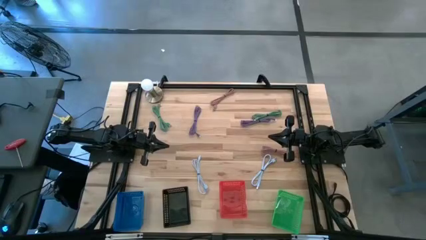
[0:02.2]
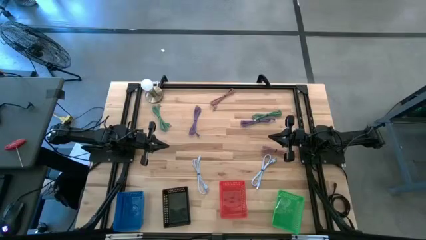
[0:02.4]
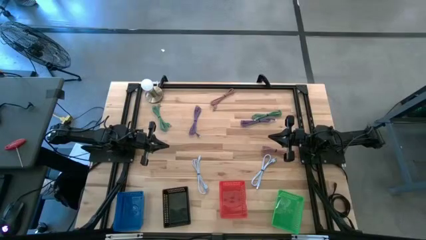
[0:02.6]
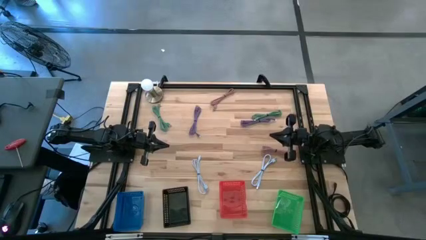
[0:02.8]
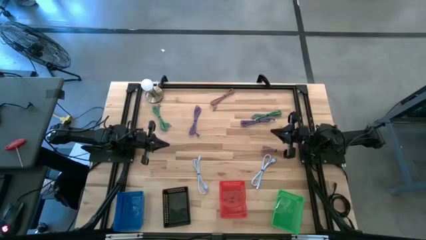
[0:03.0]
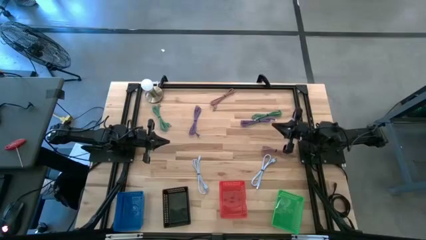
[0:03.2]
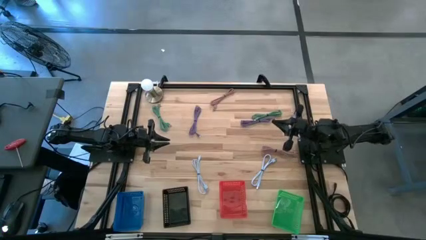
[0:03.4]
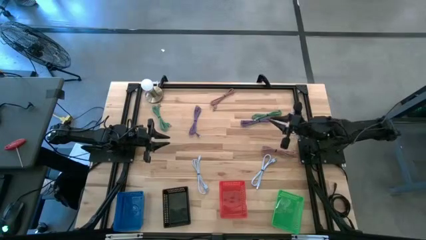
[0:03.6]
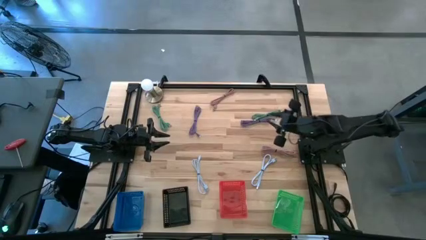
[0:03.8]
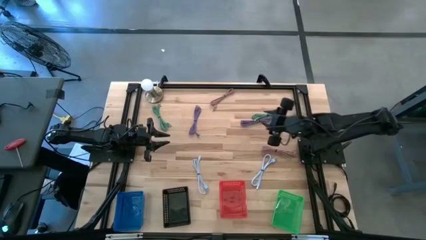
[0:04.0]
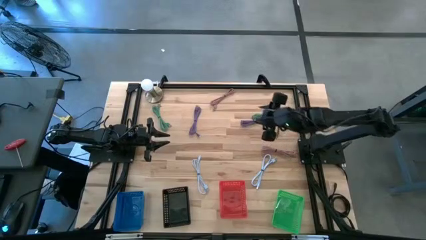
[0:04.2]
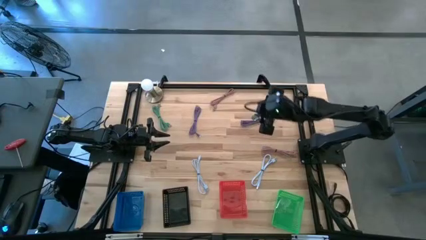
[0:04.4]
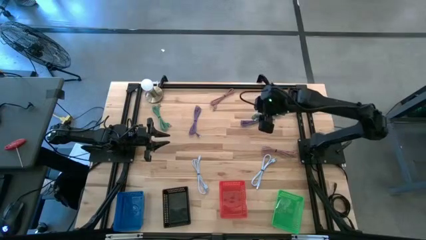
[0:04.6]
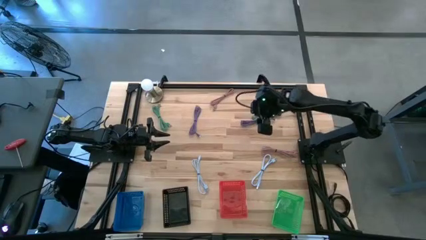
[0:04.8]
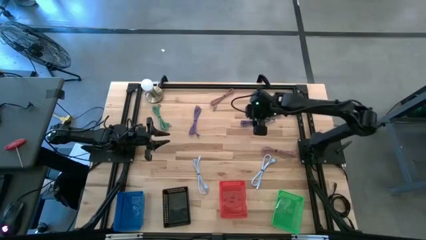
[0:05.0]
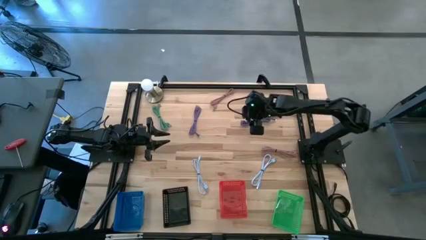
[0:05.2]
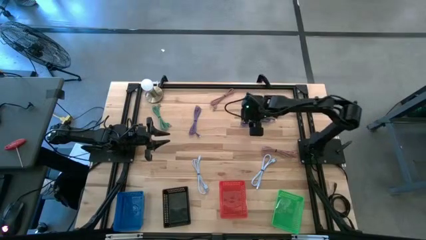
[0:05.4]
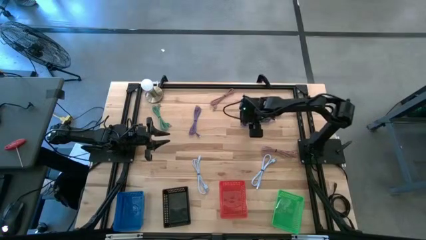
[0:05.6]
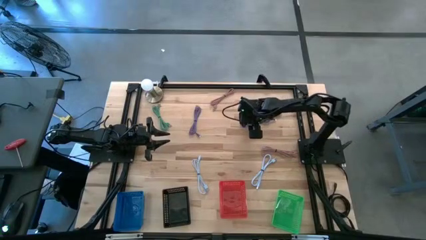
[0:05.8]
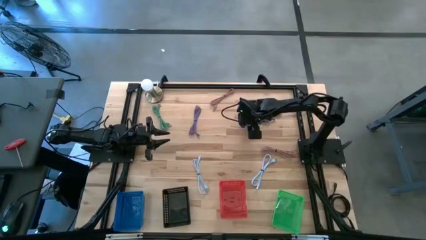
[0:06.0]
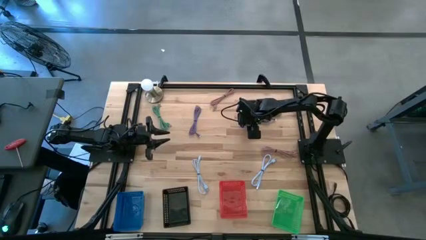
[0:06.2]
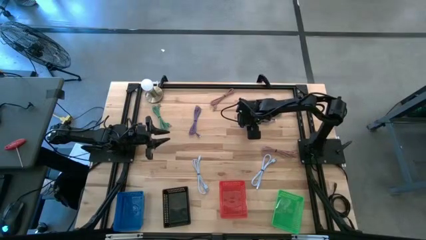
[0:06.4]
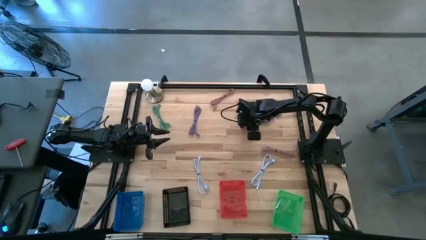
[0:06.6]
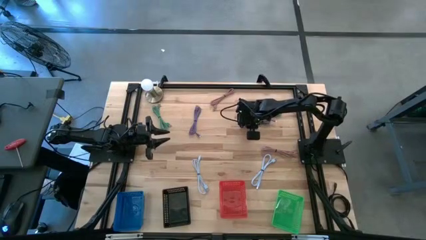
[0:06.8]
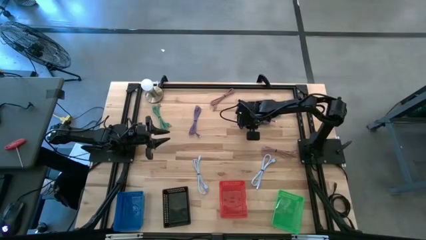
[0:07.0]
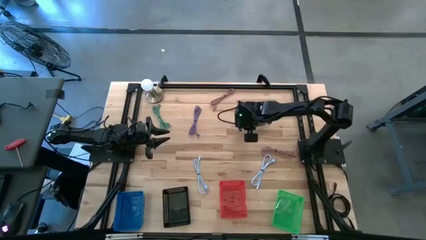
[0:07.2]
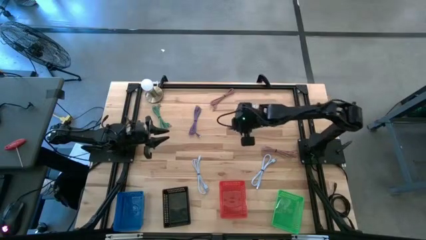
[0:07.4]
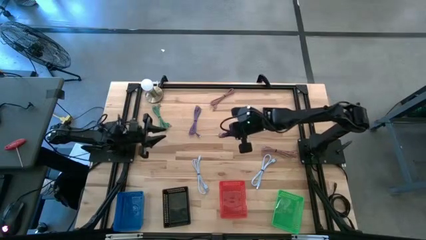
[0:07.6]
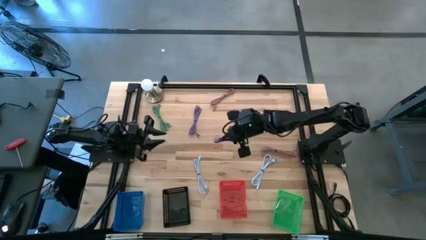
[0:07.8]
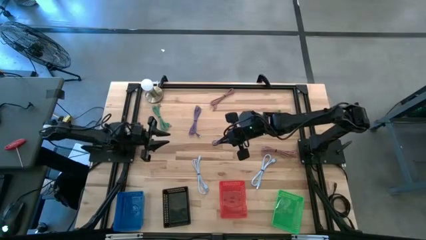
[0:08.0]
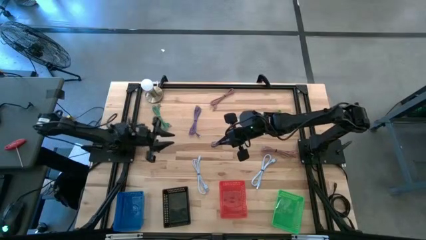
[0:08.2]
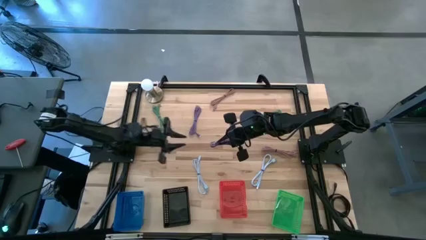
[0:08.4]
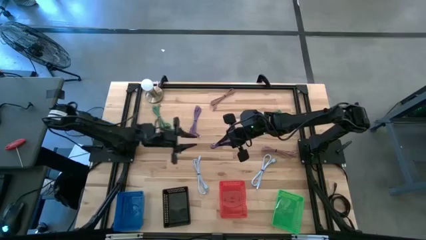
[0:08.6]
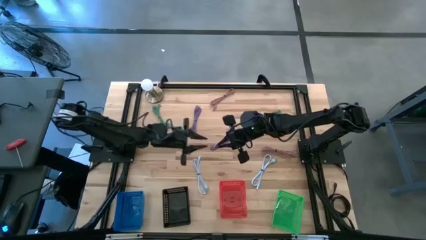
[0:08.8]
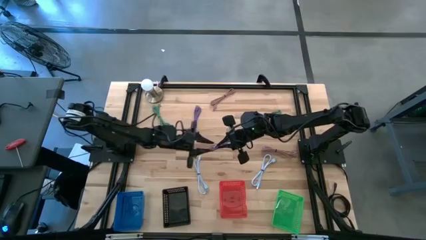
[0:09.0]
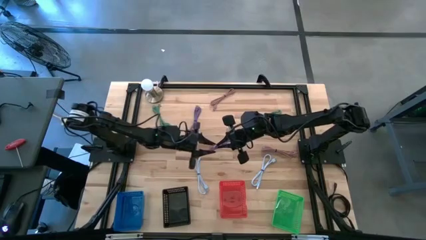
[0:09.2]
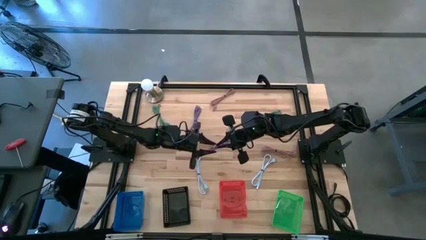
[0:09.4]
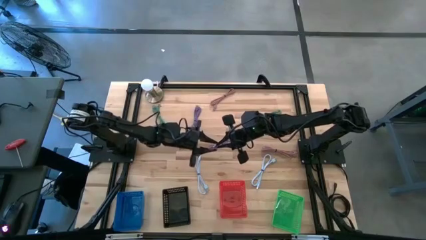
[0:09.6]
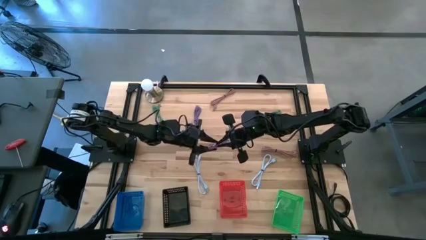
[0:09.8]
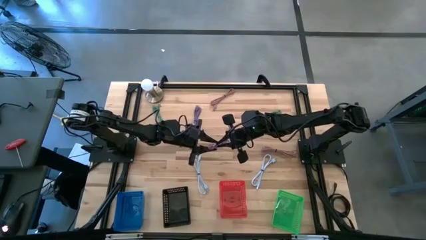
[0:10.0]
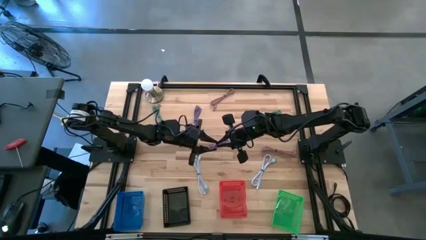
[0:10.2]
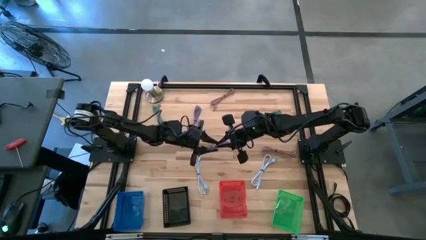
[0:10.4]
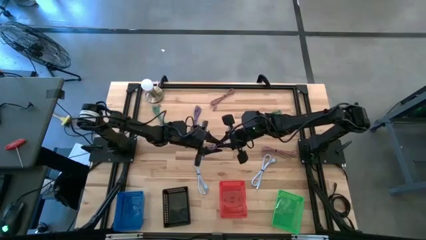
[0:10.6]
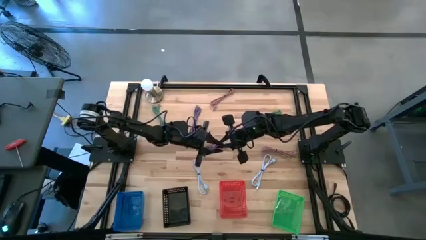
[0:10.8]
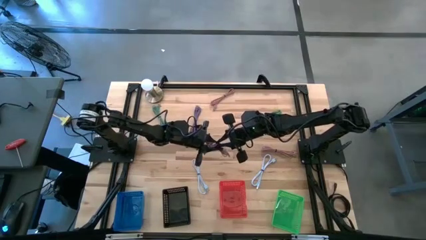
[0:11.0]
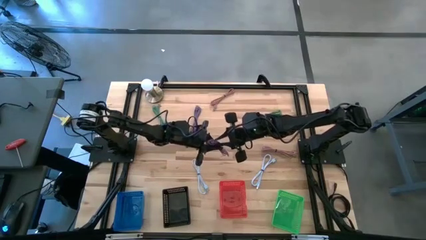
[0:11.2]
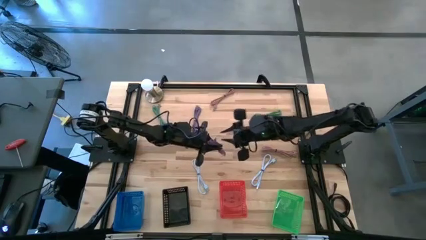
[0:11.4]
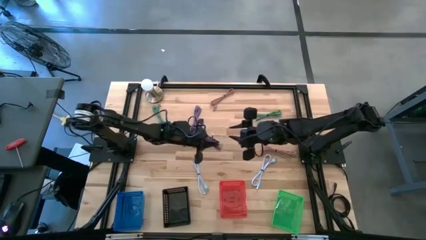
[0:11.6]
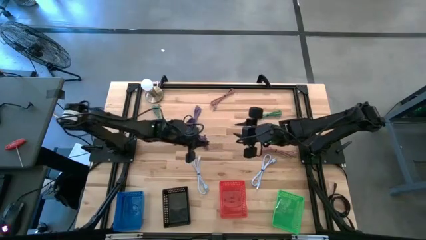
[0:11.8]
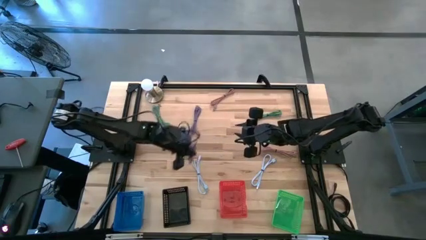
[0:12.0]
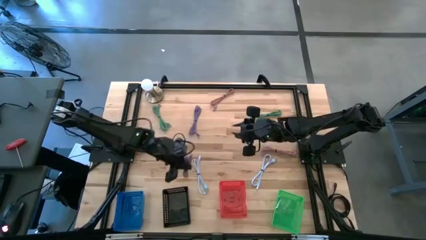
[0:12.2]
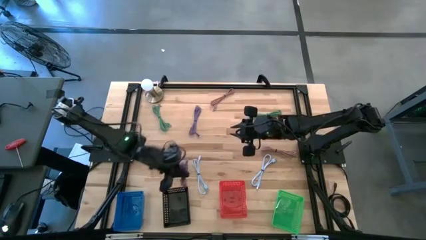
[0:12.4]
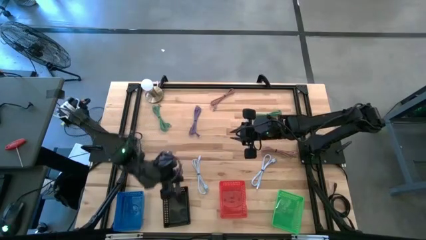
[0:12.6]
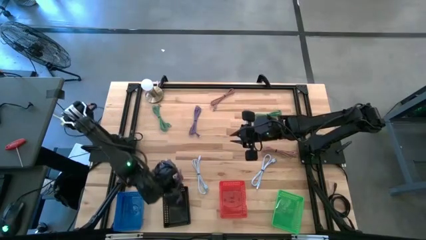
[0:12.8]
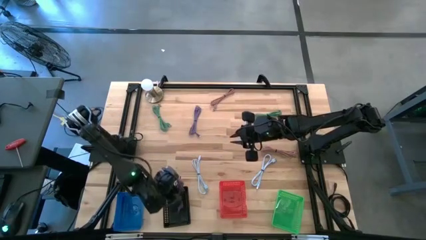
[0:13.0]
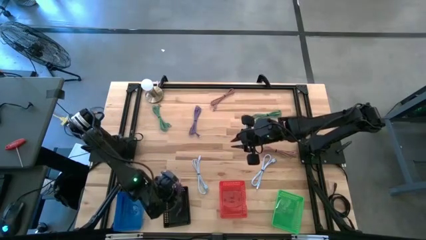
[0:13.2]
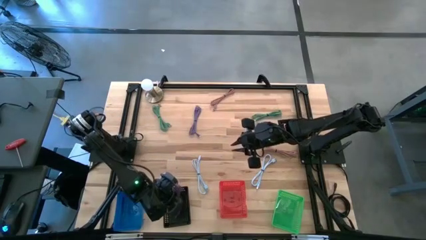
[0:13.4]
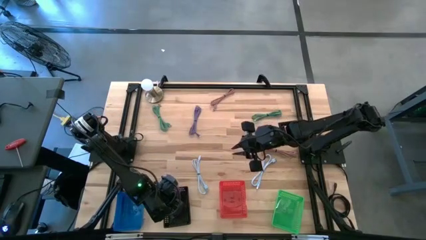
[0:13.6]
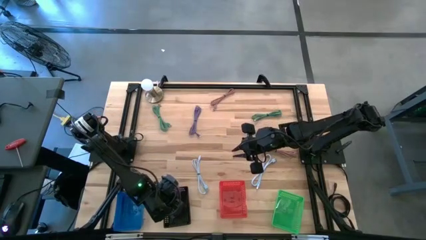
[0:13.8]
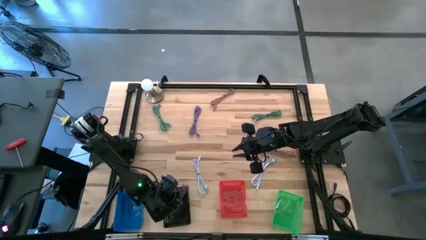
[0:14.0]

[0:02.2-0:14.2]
Task: Pick & Place USB Port
Put the right purple charger cable into the black bin

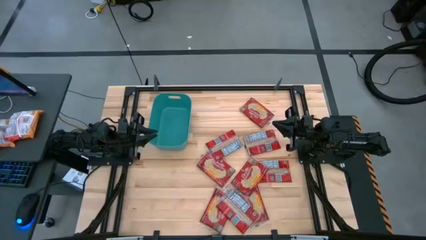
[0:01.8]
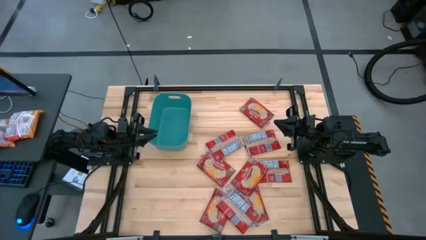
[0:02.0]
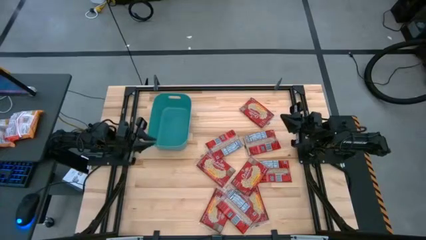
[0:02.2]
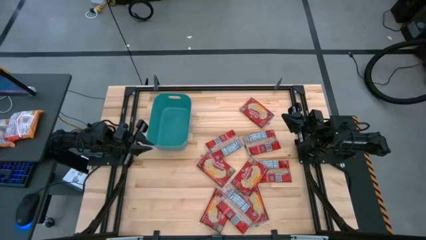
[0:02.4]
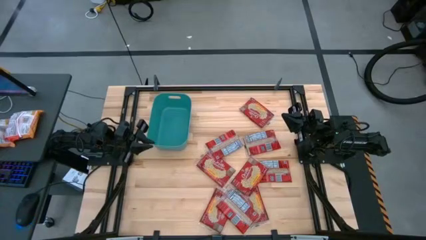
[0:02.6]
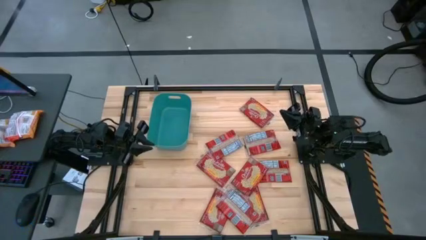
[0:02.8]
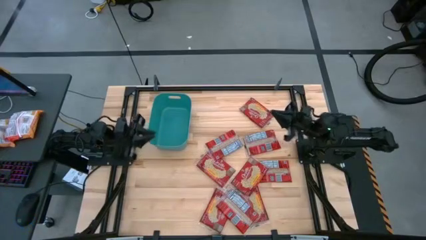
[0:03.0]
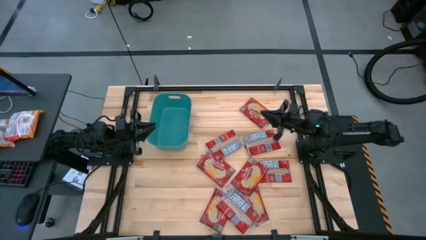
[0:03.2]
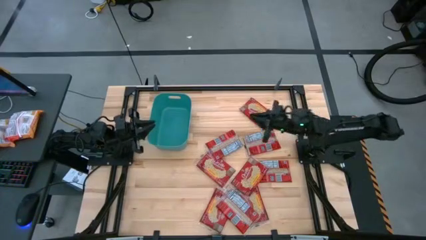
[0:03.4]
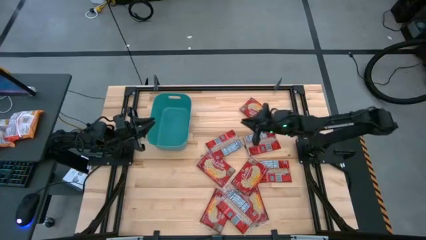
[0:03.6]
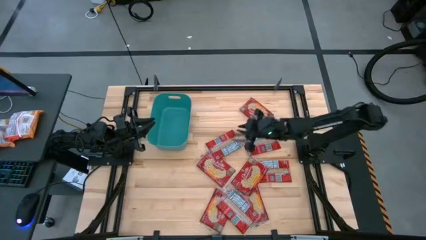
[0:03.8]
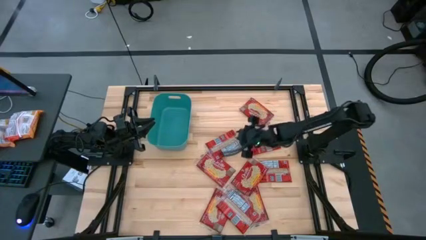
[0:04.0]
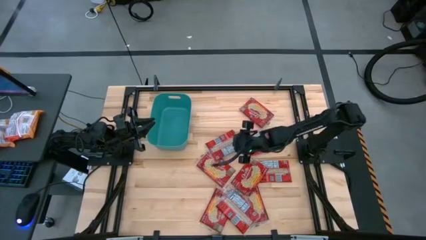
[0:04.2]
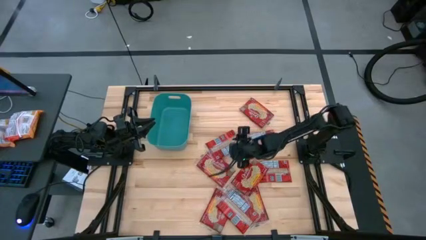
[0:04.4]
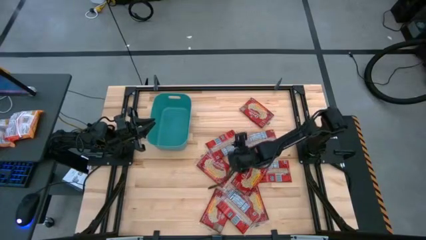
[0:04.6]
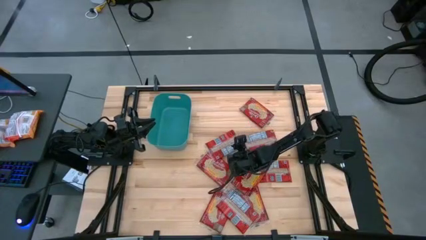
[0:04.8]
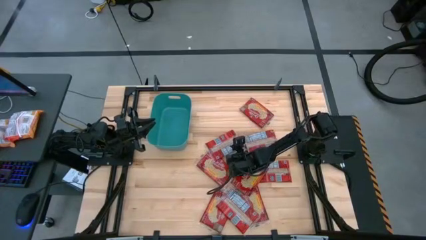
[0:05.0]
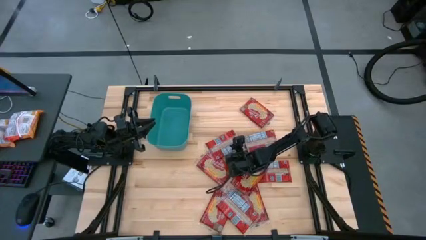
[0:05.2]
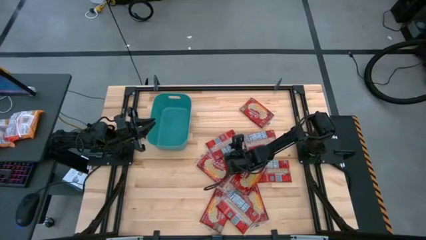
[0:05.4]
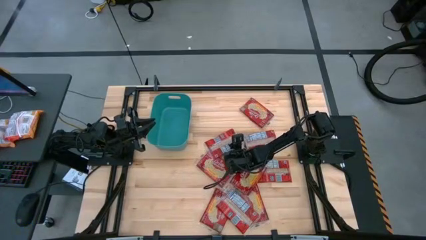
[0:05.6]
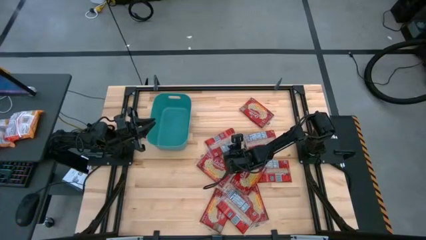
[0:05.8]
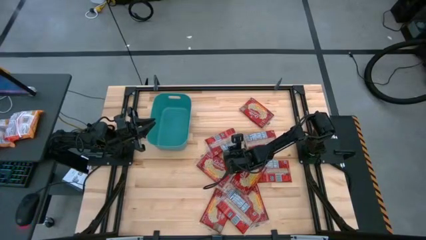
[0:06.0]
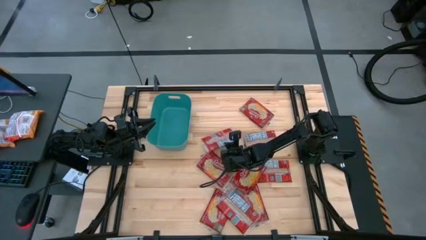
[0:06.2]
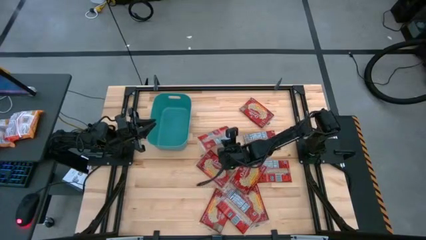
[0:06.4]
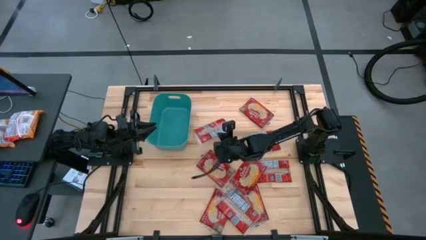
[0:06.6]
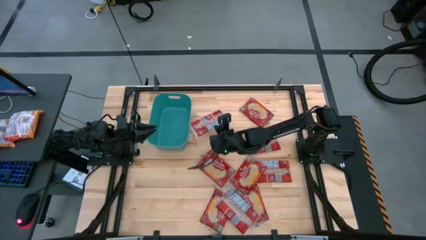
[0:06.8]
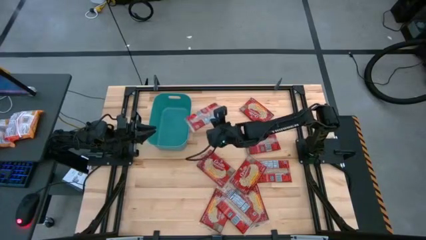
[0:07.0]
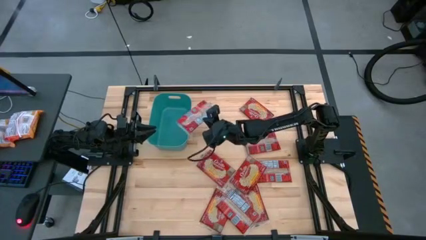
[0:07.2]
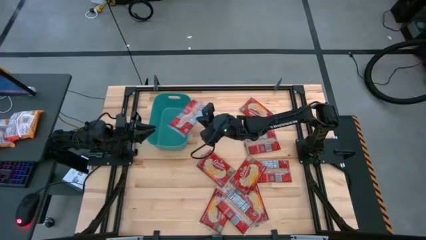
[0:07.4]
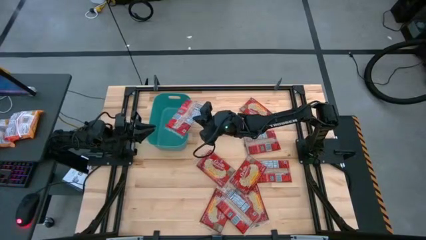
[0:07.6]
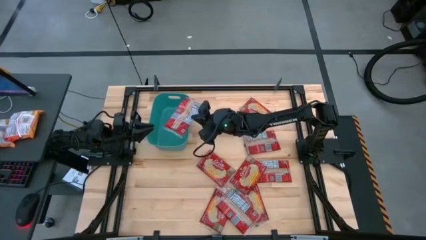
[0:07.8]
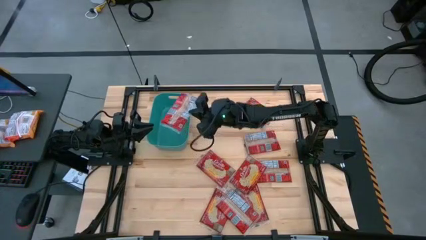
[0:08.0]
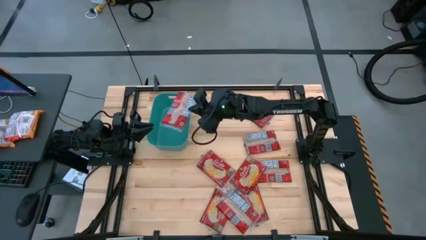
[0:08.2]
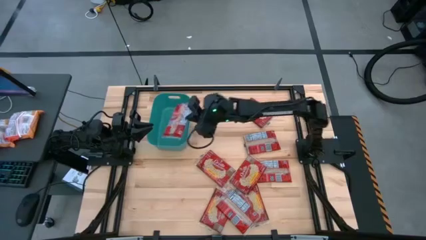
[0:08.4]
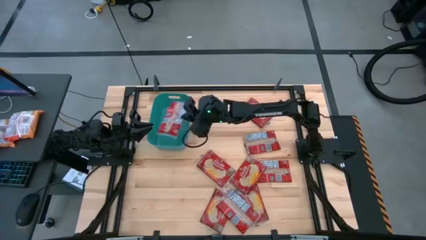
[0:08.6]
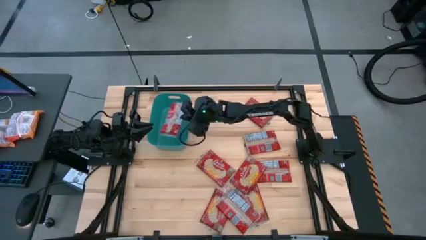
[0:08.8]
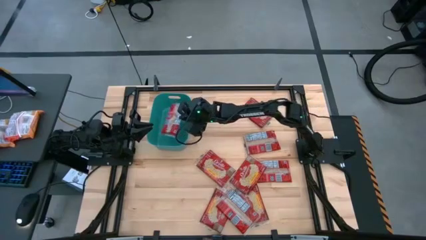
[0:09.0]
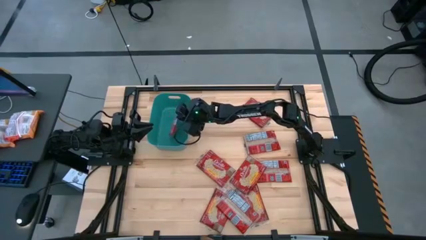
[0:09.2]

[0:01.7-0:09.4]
Task: Sort popcorn bags into baskets
Put the red popcorn bag into the green bin
